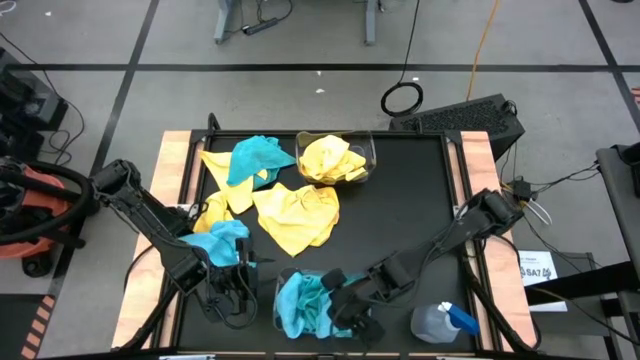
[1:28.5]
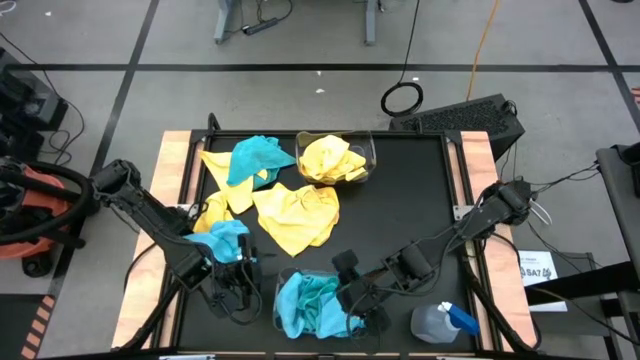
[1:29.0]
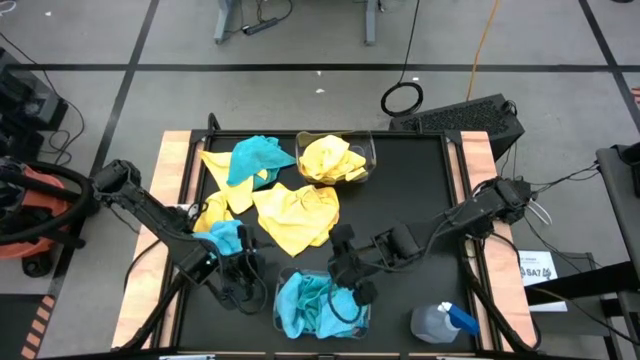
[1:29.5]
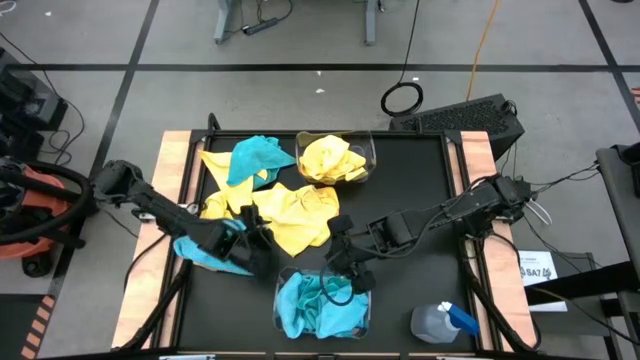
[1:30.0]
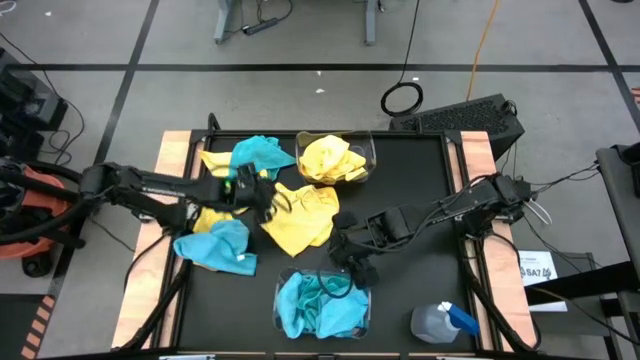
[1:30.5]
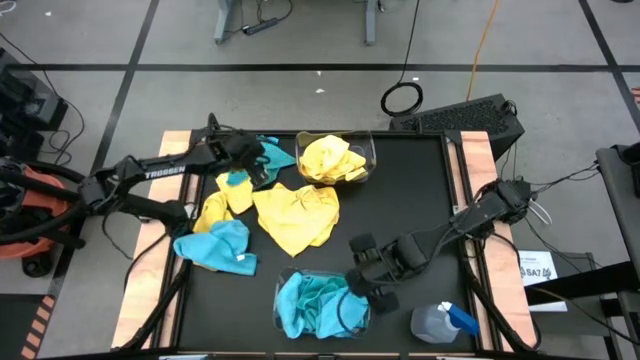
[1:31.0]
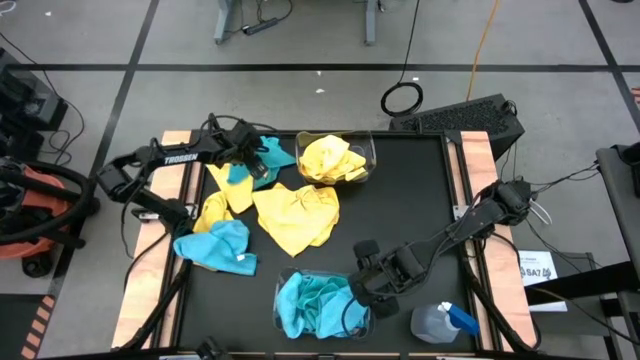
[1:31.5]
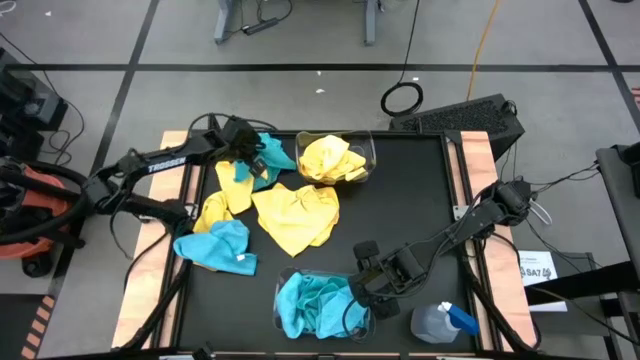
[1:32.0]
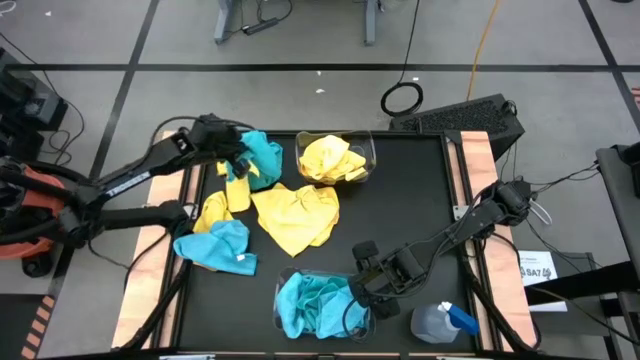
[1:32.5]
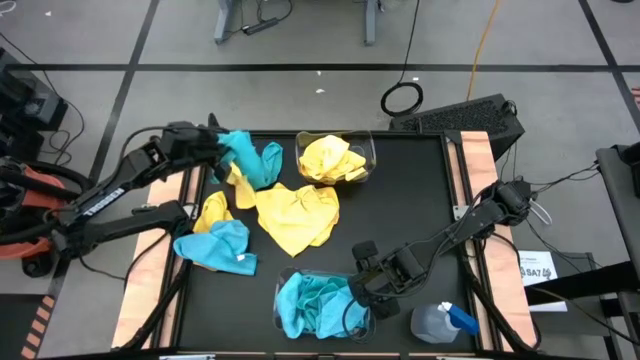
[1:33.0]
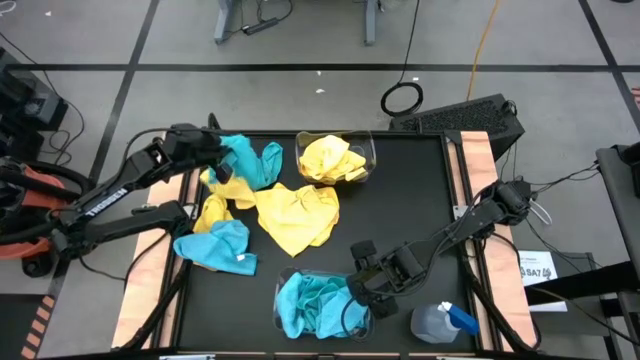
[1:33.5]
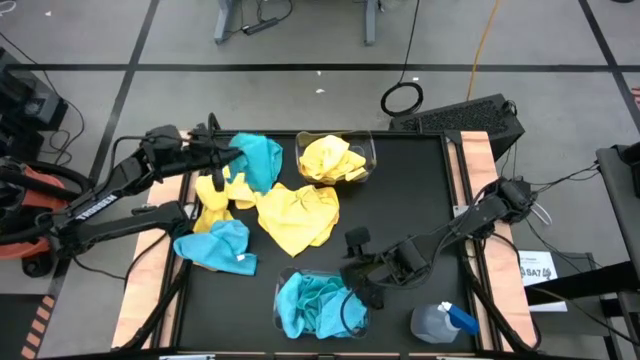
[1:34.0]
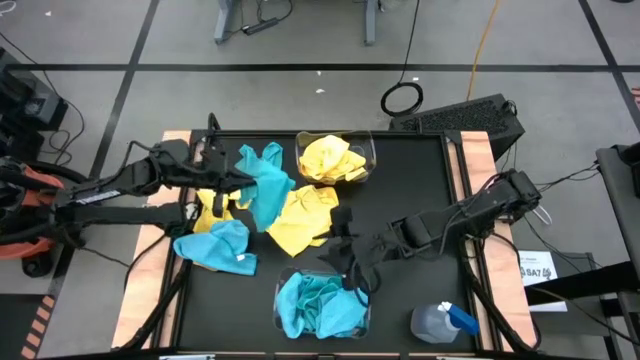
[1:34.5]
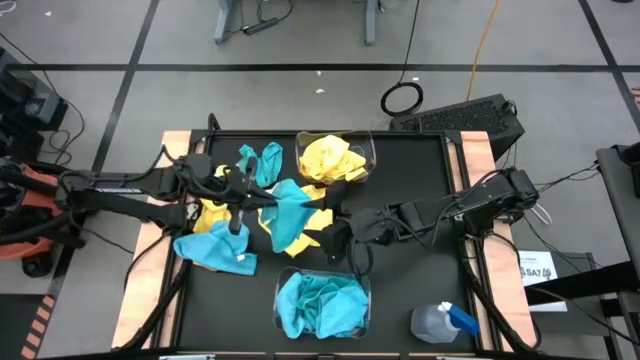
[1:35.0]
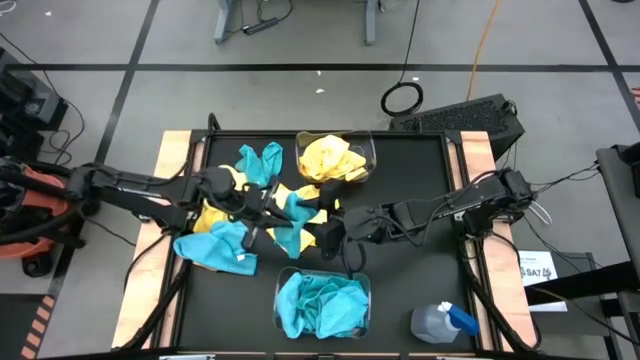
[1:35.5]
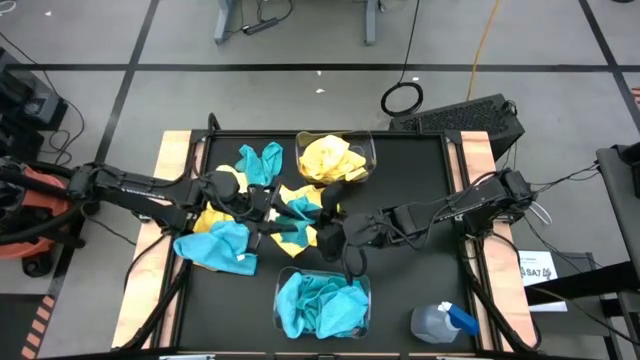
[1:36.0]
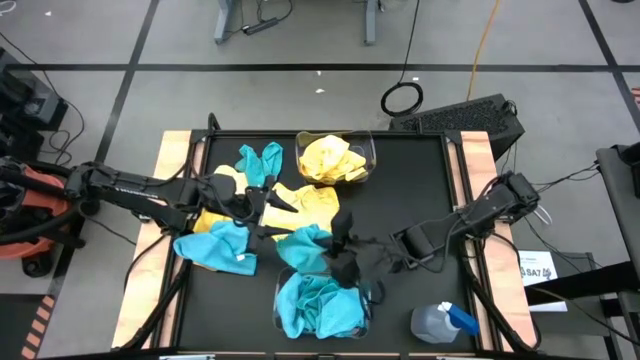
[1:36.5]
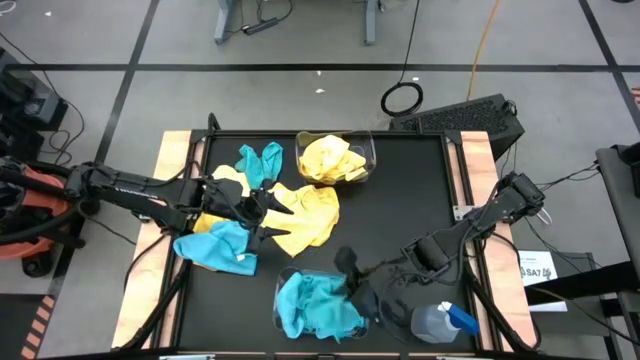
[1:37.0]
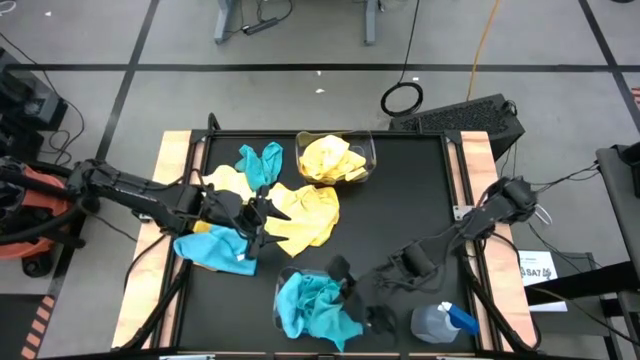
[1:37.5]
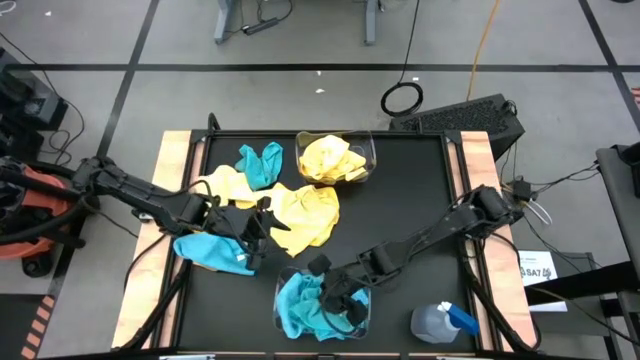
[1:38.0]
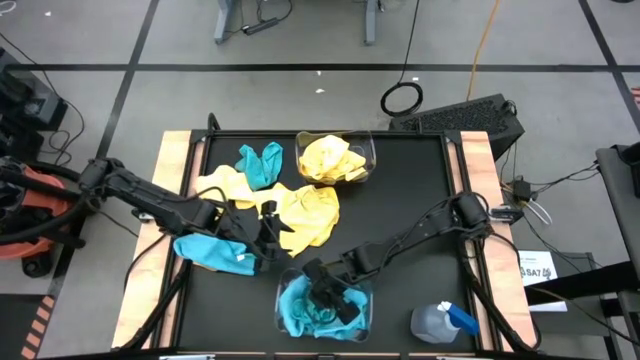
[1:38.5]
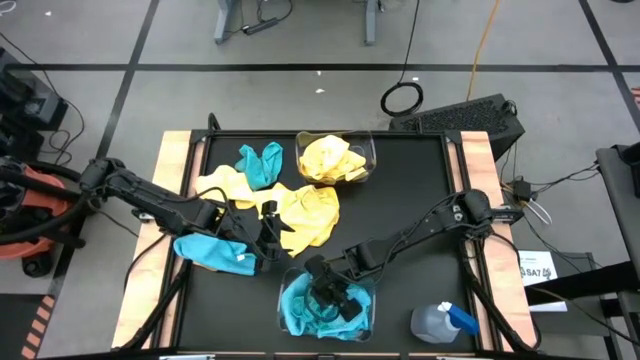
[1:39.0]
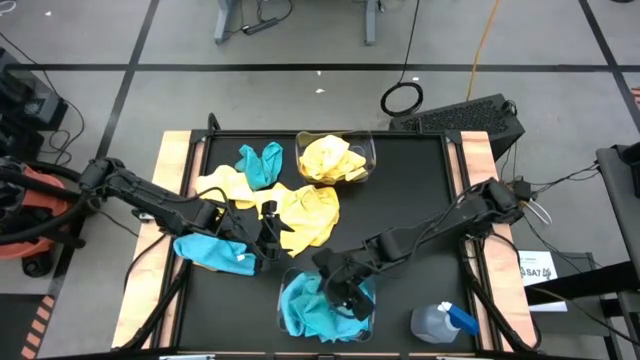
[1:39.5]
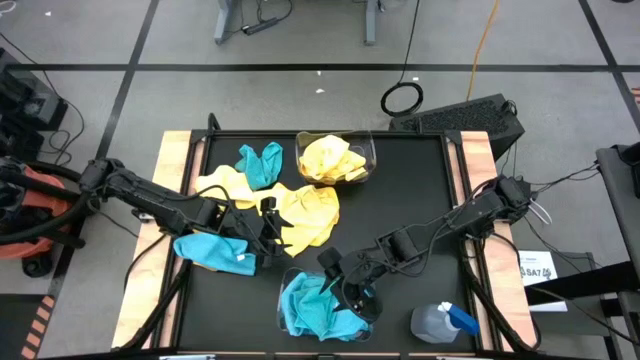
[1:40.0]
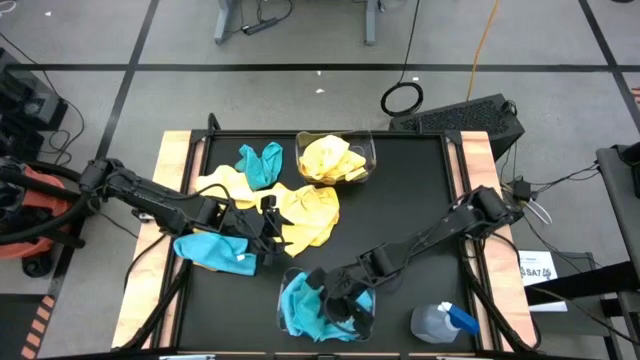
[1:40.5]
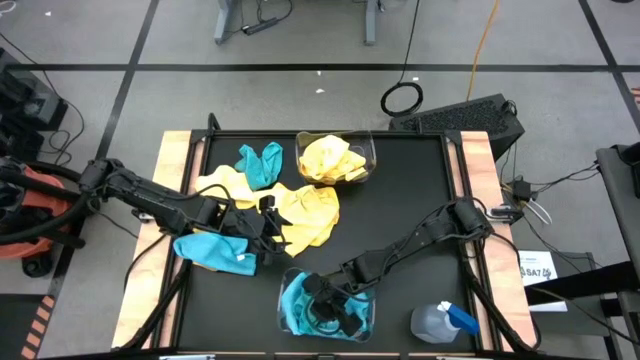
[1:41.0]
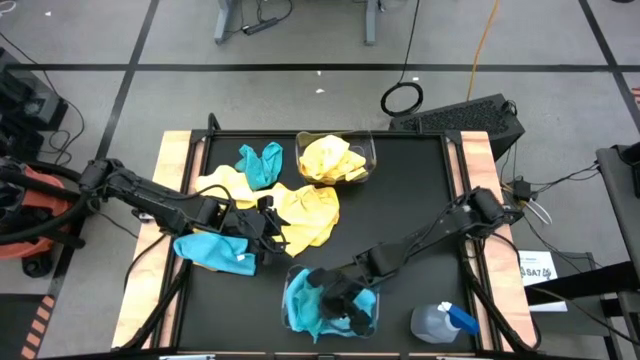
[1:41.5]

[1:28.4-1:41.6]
Task: Sort microfiber towel by color & place in baskets
Put the blue towel into the bottom transparent bin

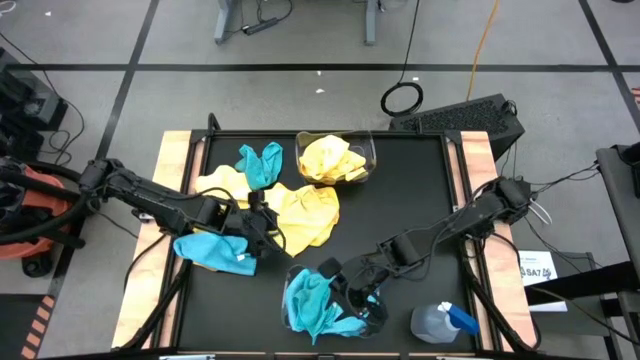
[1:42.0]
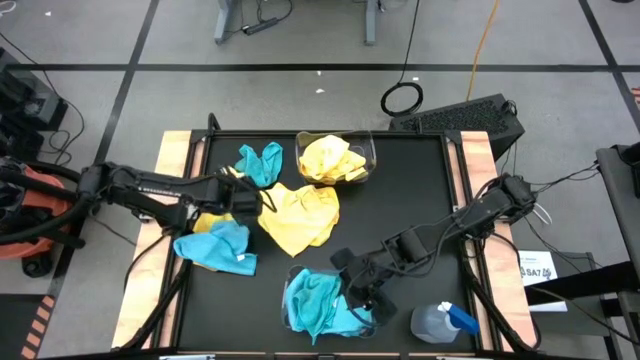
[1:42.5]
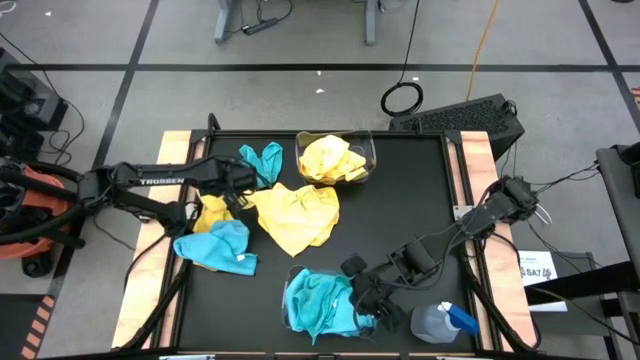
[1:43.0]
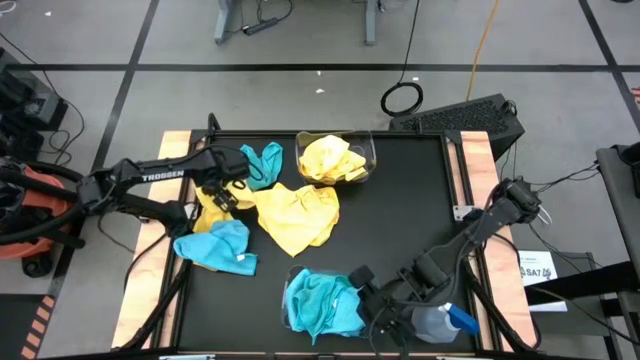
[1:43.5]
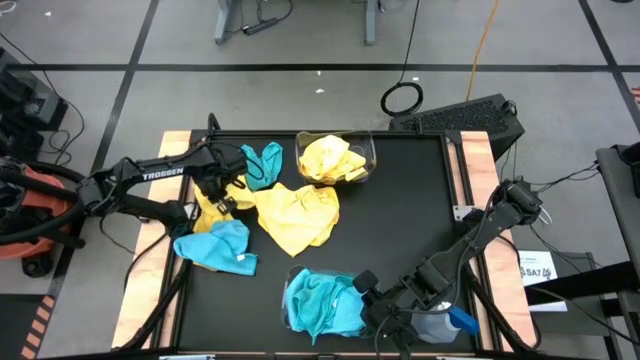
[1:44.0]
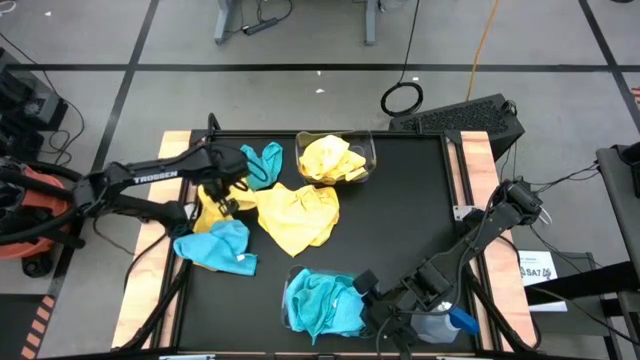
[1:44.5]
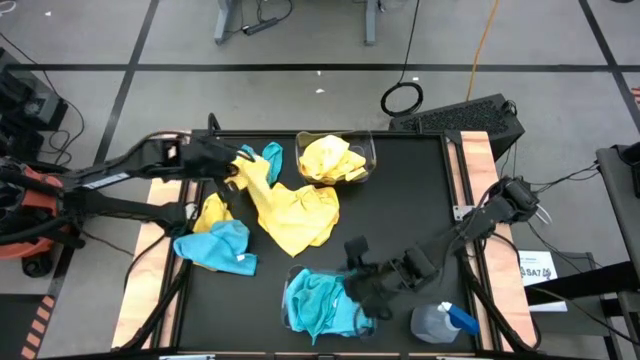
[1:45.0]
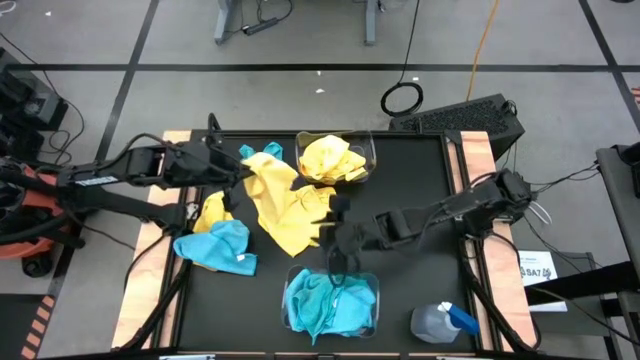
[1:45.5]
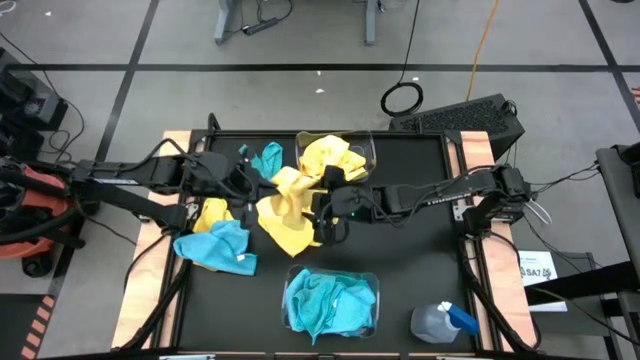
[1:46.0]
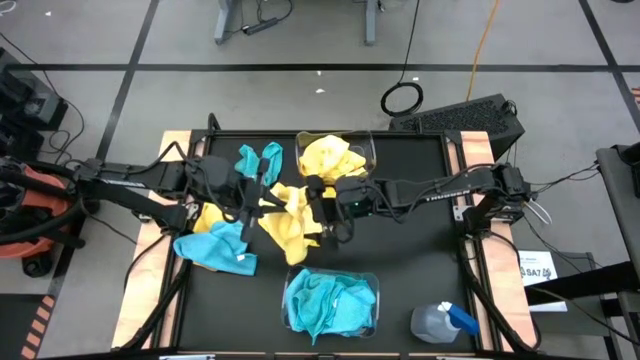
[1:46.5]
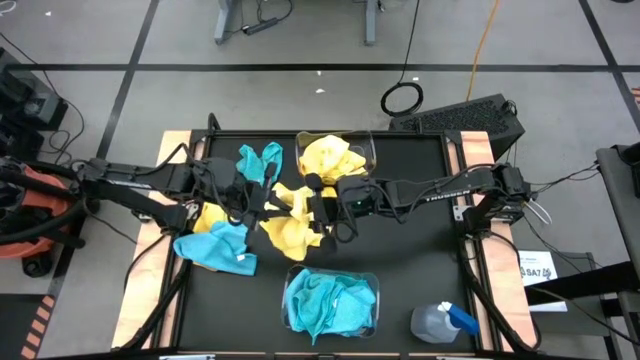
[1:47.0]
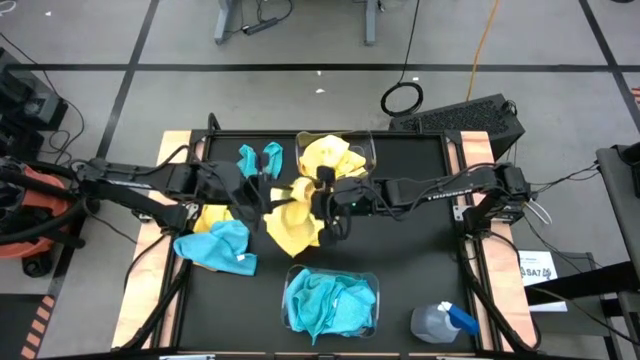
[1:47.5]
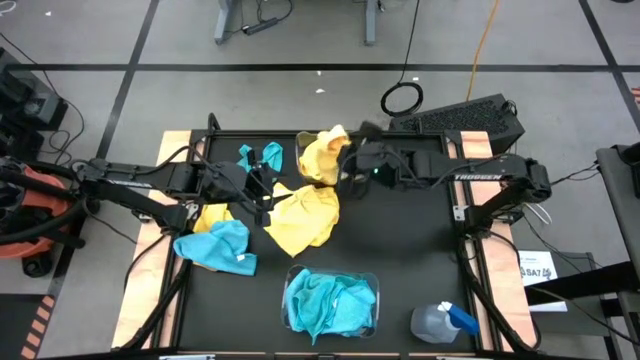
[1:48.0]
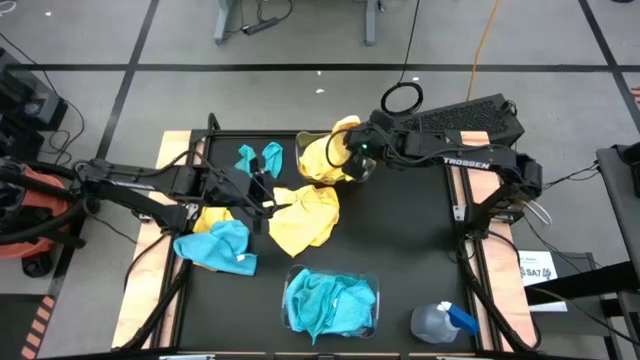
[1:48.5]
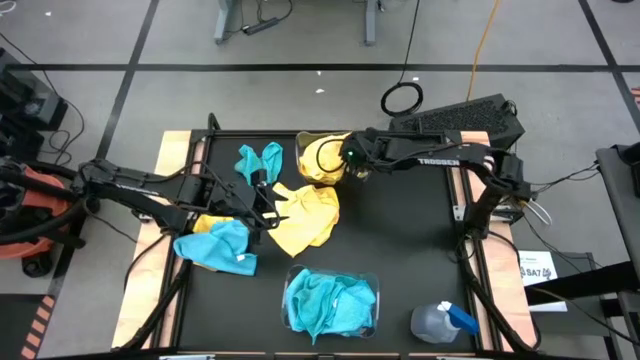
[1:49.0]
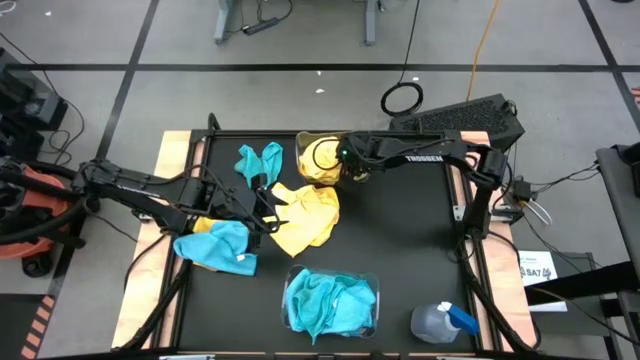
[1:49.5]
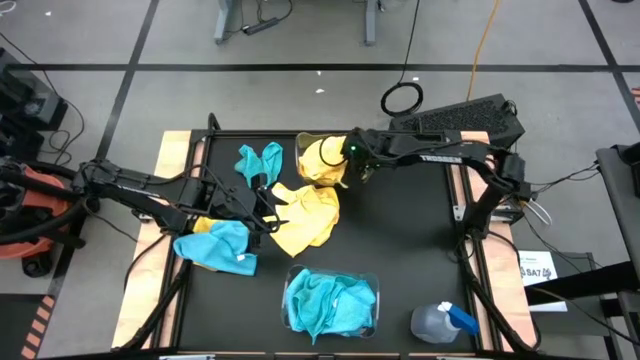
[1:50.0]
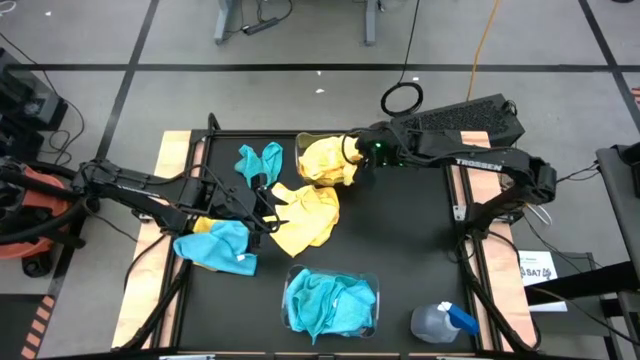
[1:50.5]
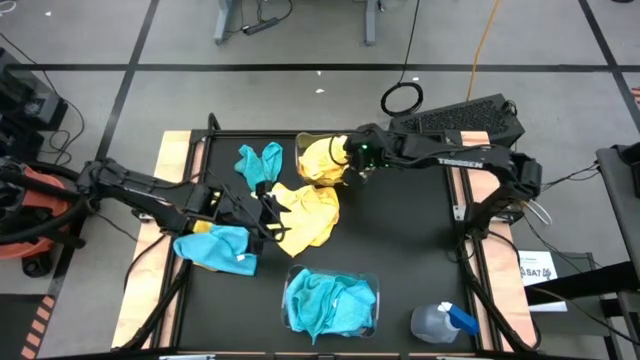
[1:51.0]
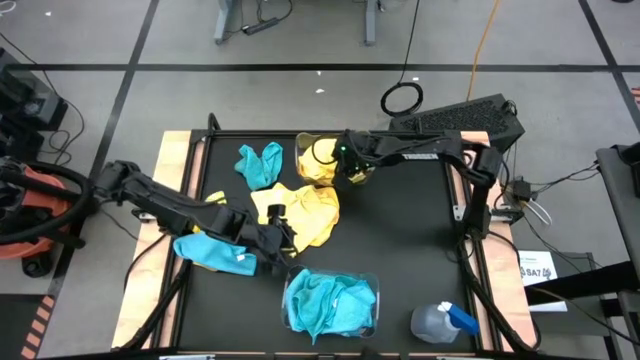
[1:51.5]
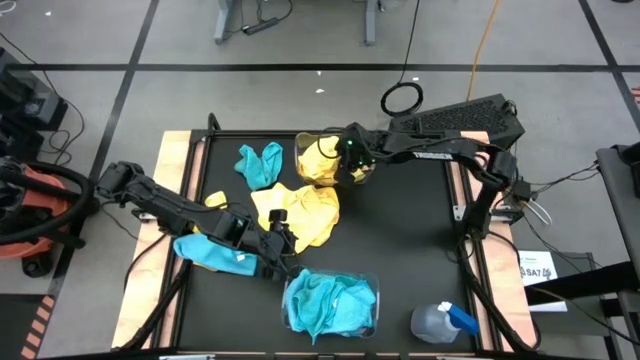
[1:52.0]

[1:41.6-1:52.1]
Put the yellow towel into the top transparent bin
